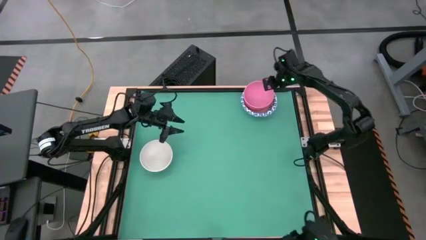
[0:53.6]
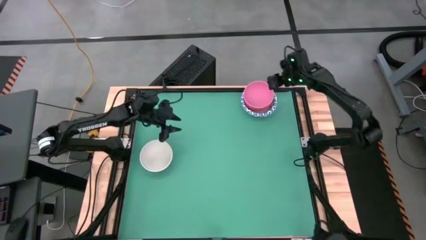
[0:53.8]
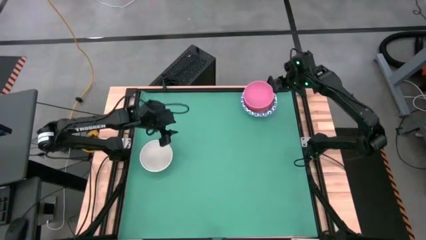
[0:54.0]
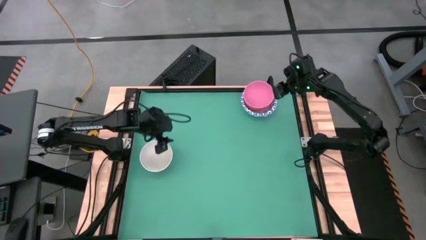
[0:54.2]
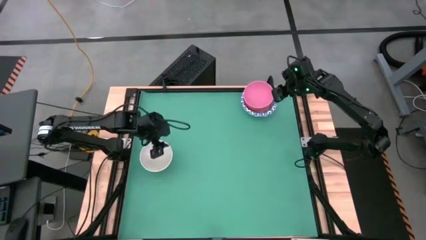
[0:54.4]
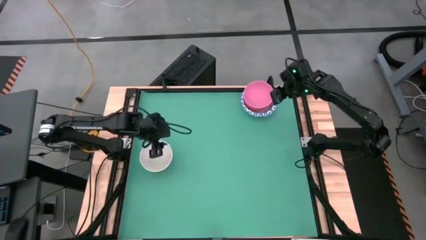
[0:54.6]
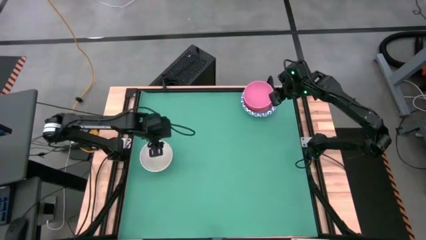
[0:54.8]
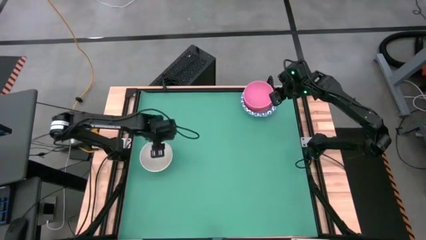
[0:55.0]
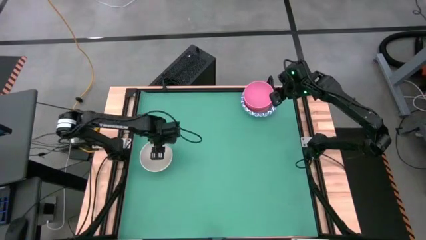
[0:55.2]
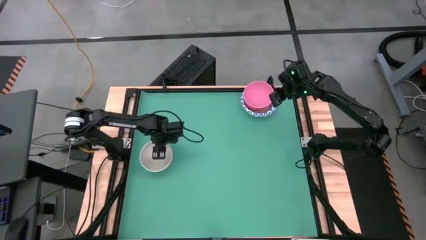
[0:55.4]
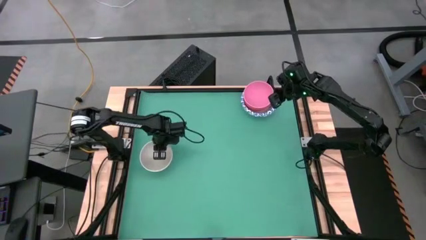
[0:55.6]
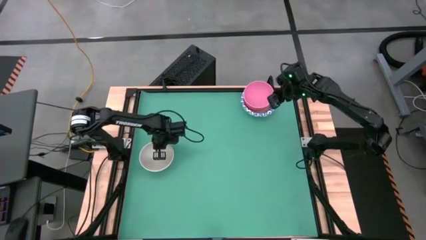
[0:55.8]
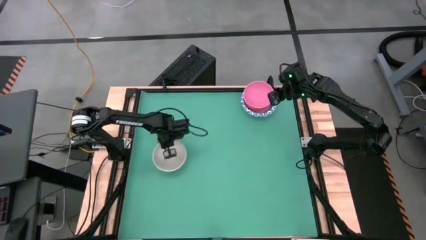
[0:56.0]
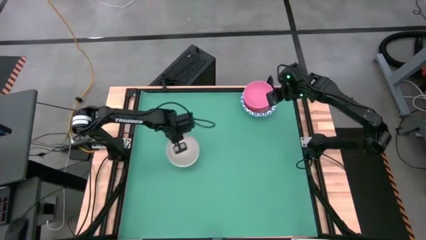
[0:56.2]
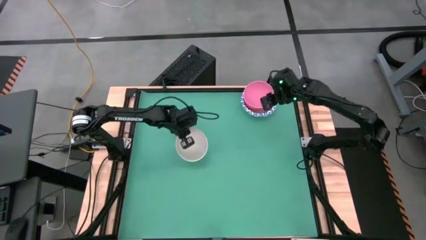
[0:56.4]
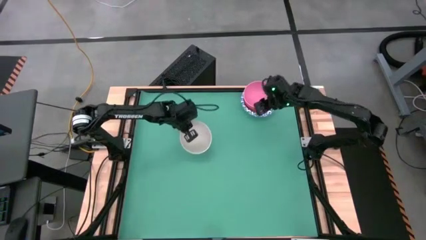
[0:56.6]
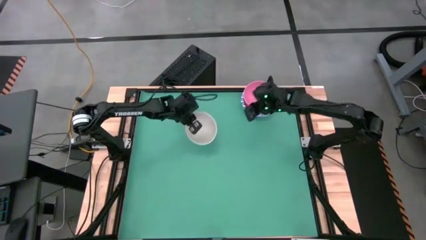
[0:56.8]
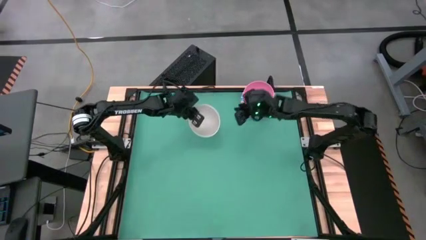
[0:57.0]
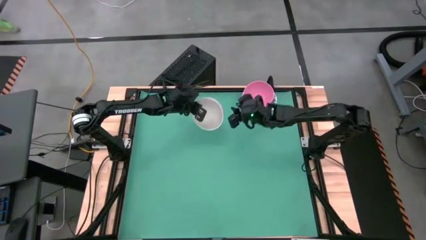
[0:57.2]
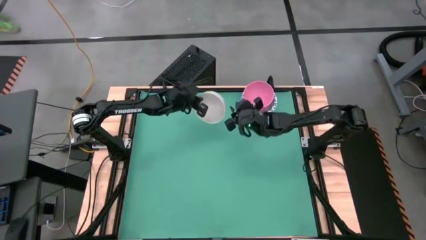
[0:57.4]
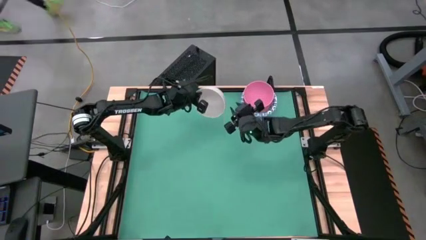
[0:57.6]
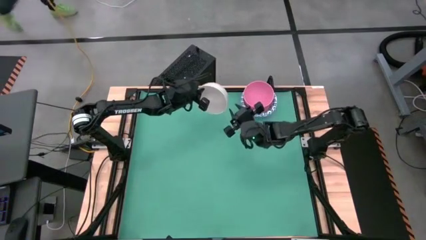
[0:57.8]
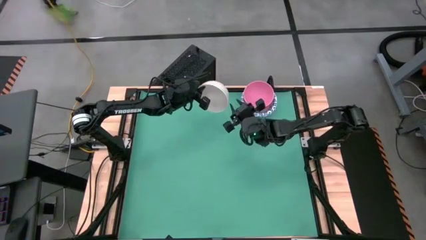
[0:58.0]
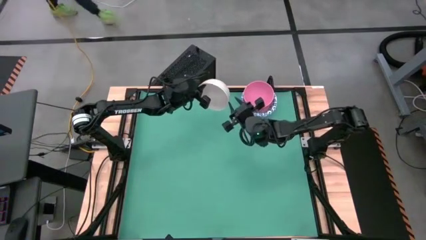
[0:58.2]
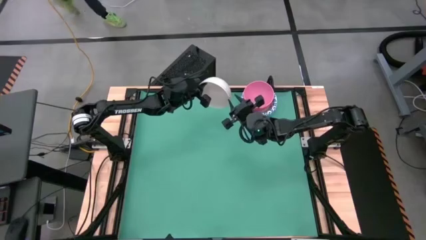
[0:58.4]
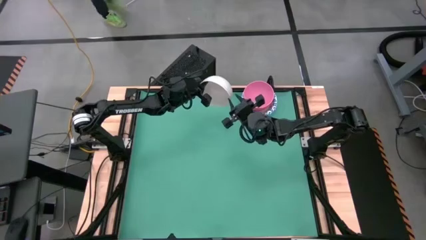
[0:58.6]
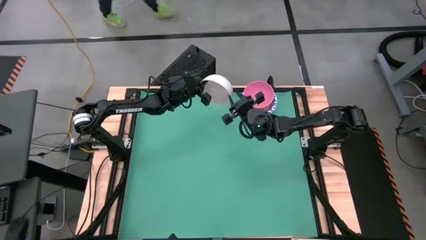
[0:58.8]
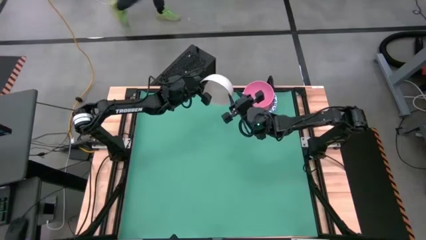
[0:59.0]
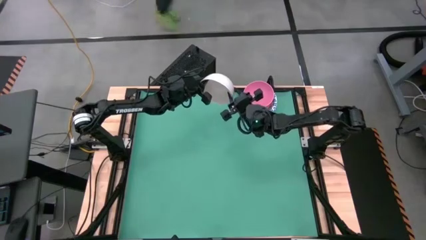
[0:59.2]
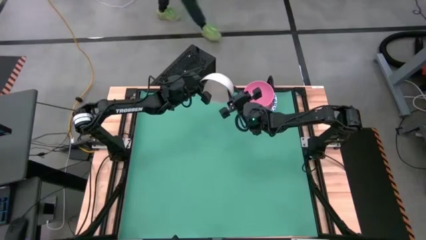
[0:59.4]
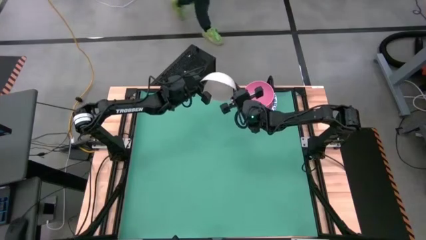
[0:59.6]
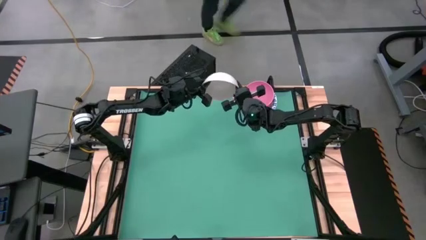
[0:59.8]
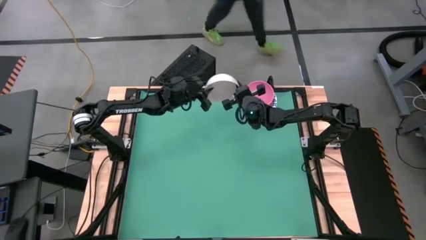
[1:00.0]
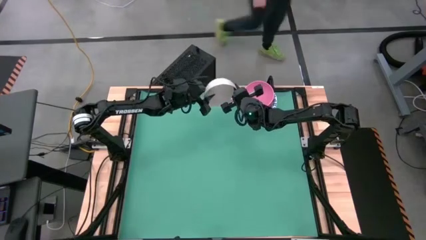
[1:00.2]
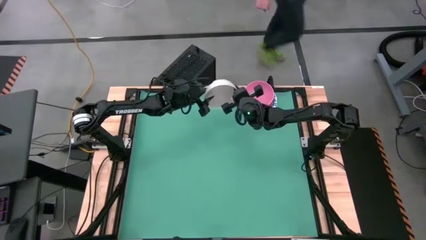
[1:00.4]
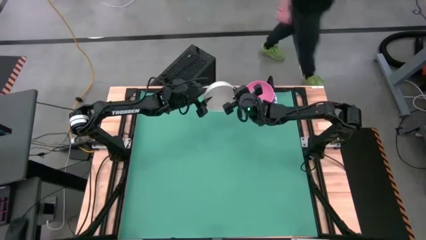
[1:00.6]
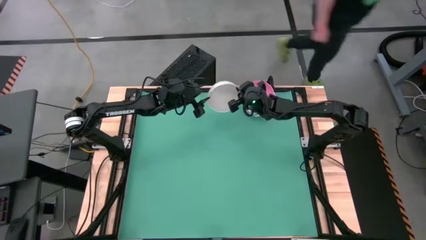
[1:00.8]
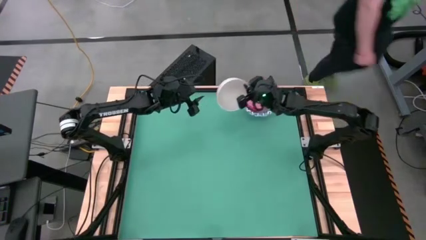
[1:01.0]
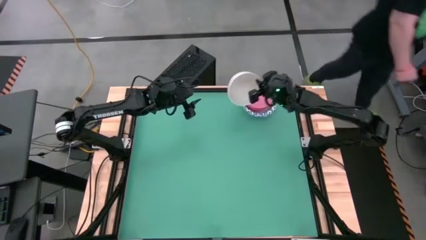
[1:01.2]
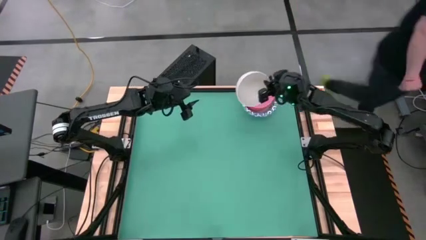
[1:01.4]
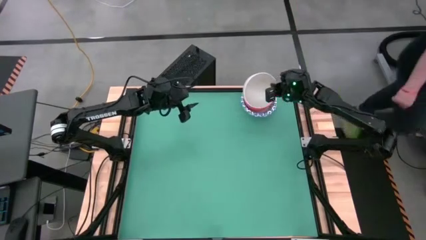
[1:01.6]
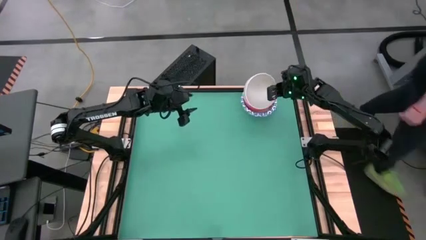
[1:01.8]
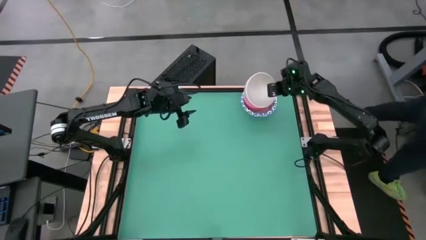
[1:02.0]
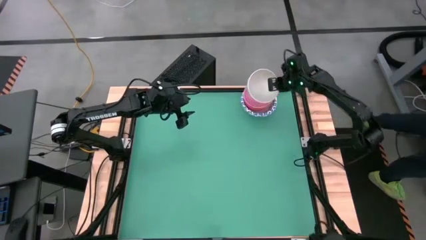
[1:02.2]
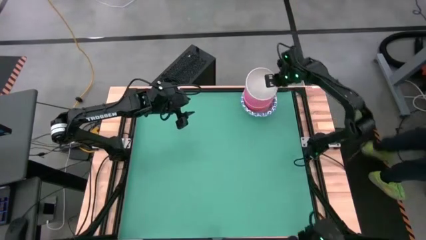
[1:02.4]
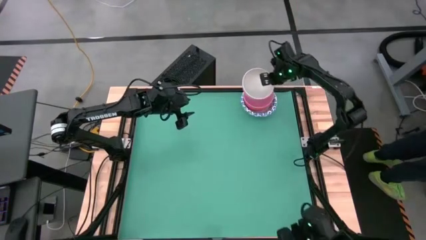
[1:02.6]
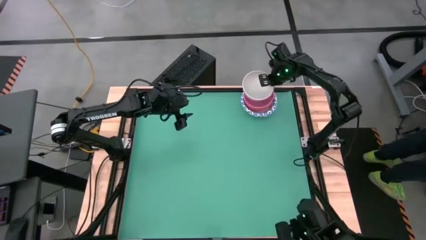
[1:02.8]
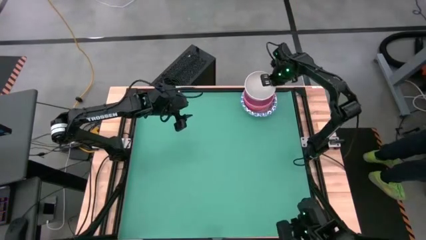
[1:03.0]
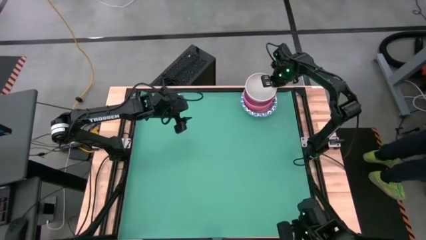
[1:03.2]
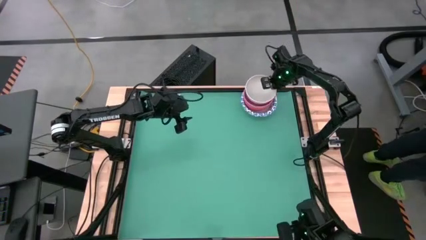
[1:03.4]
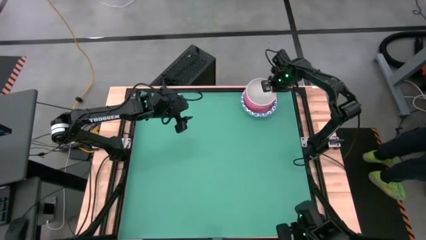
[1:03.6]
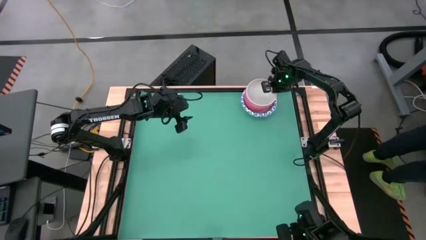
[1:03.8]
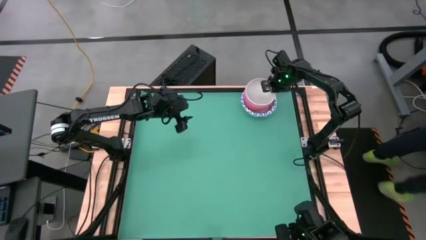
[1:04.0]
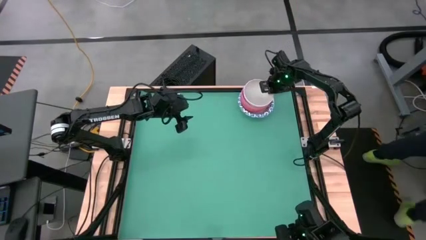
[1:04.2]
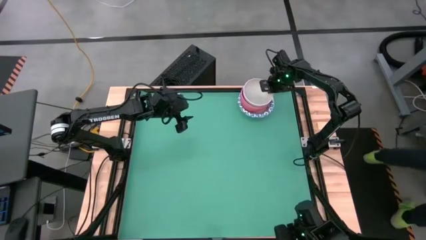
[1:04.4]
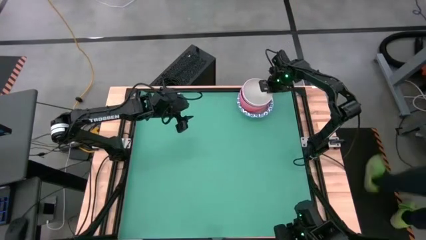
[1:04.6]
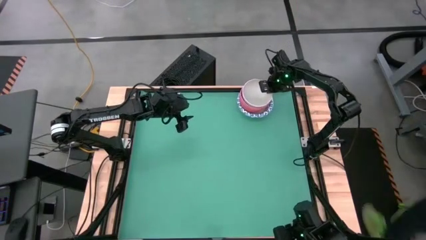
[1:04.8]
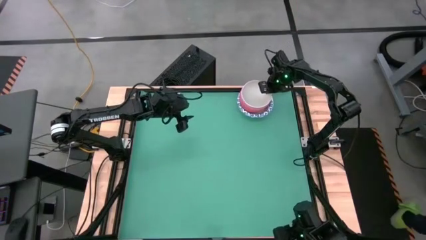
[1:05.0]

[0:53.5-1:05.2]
Task: Nest bowls inside each other by size order
Stack the white bowl on top of the pink bowl

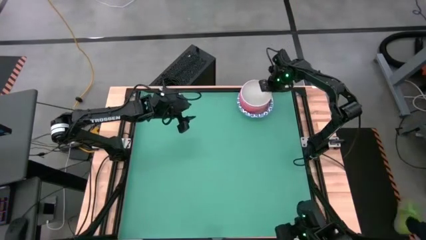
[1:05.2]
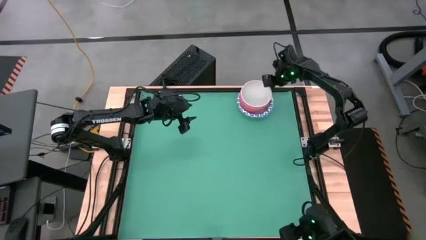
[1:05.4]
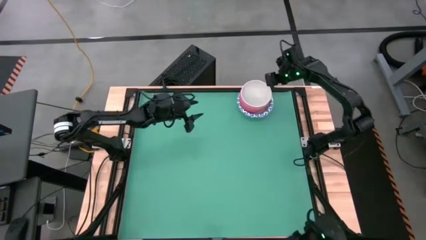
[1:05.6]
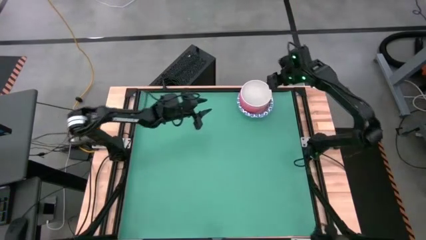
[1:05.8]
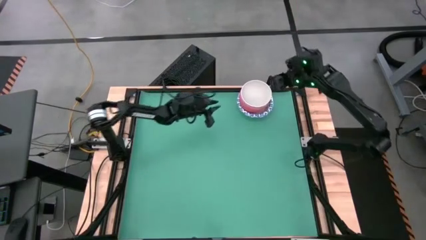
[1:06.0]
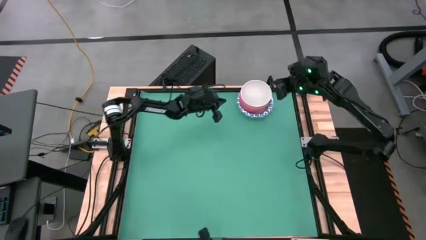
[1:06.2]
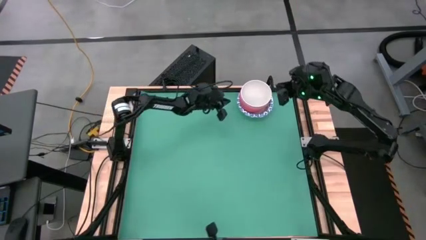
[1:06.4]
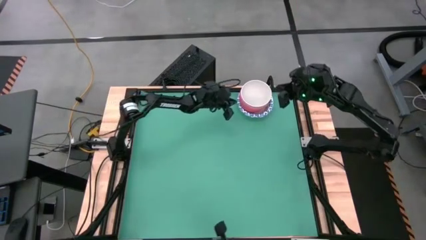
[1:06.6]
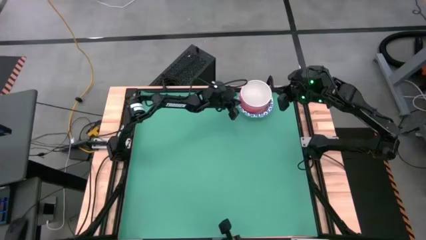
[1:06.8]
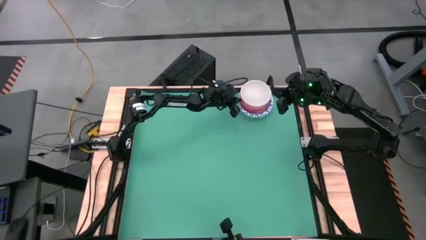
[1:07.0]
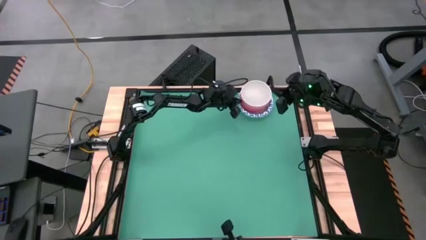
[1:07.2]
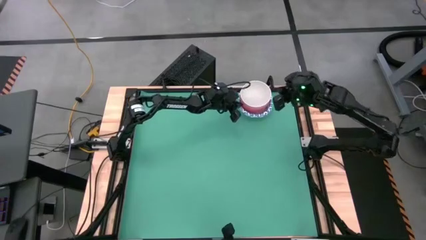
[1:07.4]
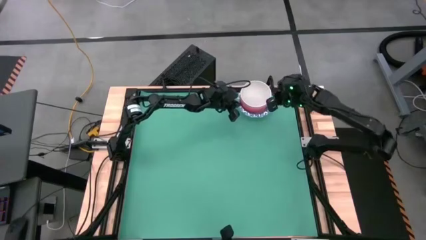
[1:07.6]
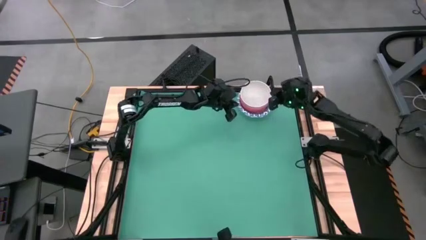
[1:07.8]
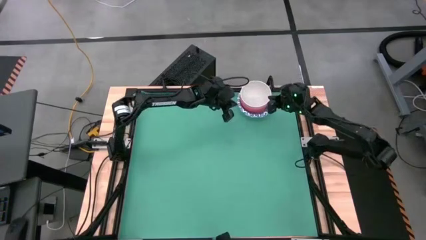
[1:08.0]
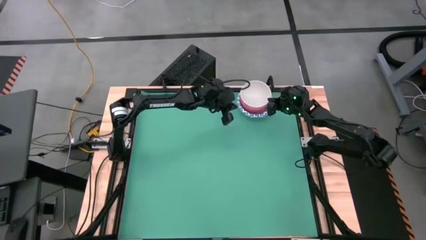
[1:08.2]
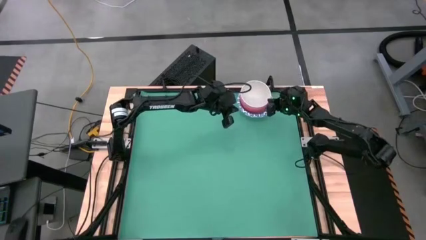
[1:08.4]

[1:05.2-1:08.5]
Adjust the stacked bowls

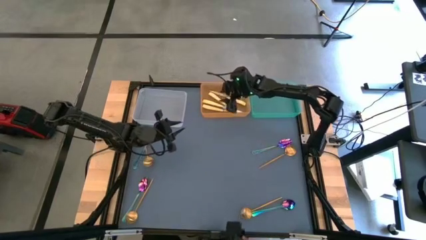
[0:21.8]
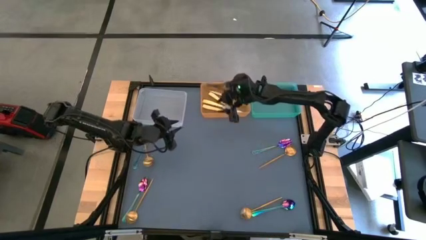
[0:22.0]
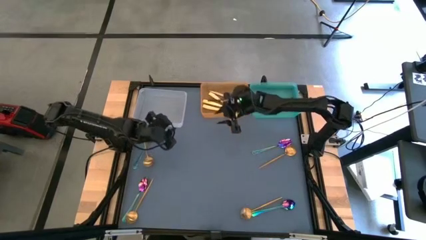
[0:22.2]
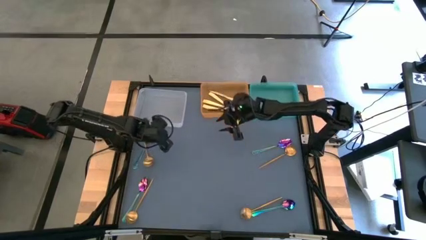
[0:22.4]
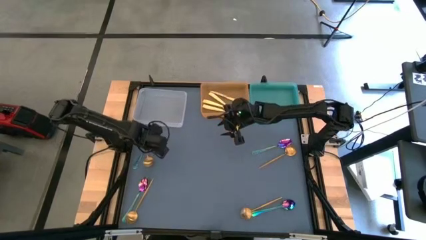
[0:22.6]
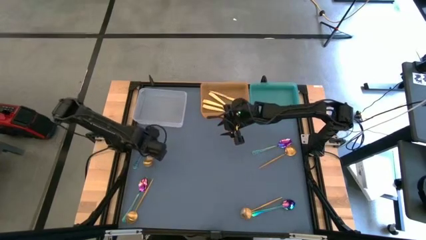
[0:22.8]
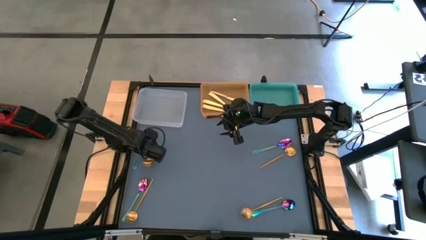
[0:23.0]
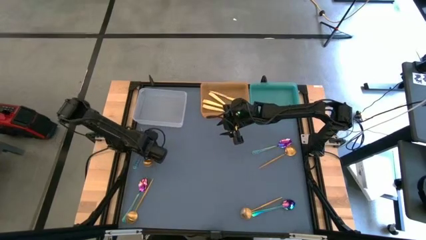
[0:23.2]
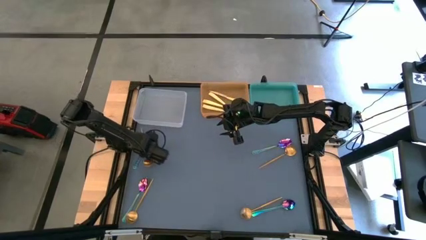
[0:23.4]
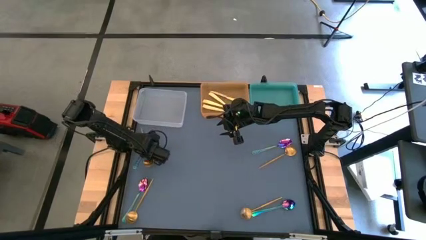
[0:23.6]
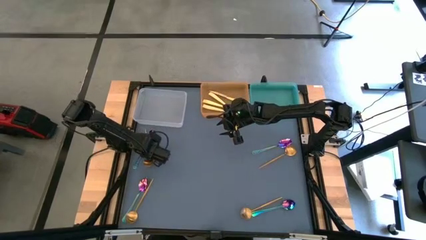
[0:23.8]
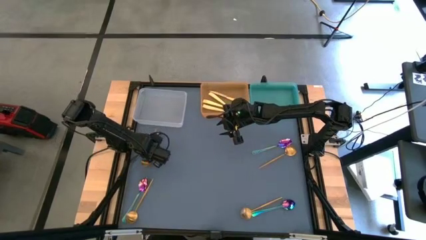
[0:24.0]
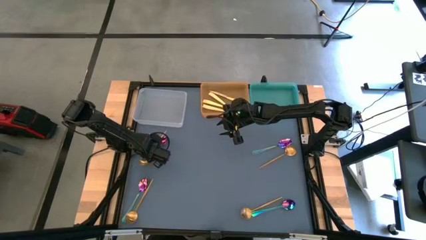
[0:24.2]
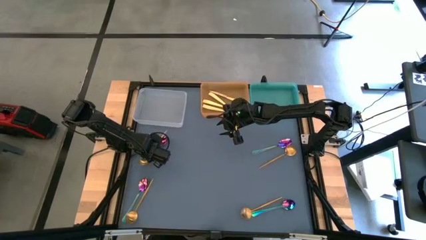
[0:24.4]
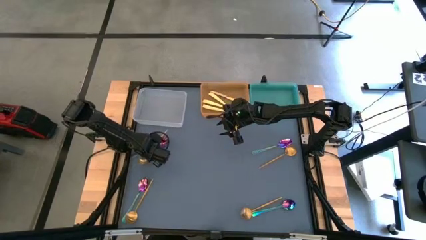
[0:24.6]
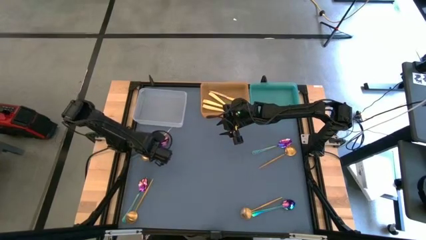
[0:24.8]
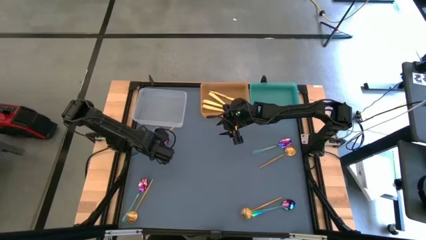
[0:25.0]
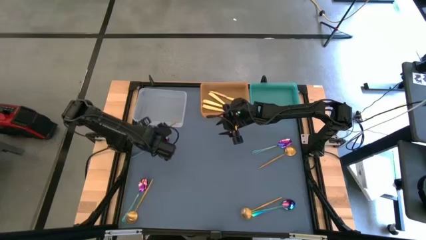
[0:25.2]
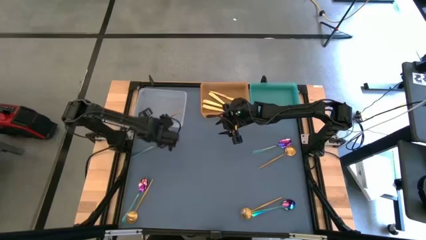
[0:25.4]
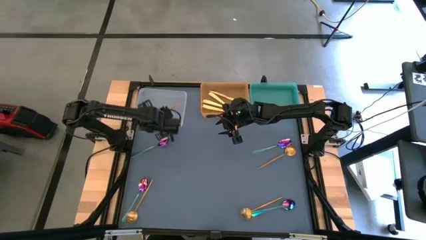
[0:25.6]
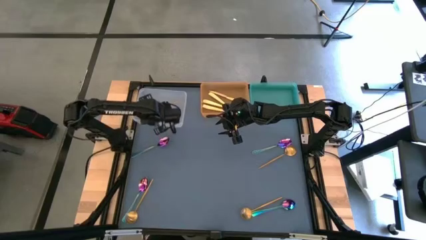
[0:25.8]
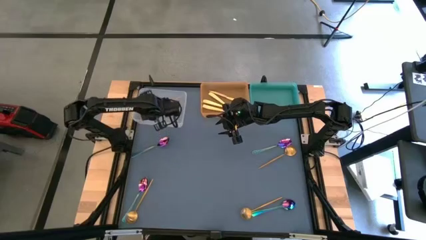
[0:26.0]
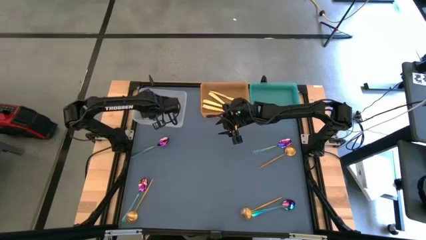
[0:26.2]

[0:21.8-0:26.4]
Task: Sort silverware by color (type)
Put the gold spoon into the white bin
